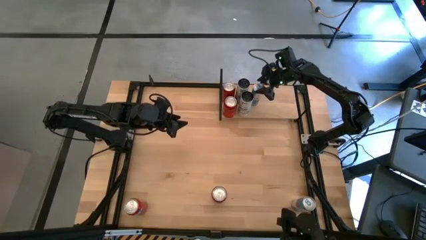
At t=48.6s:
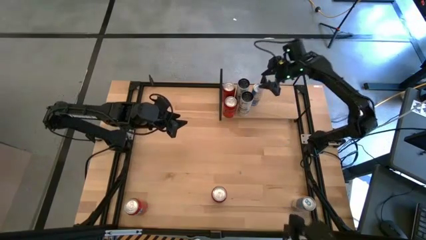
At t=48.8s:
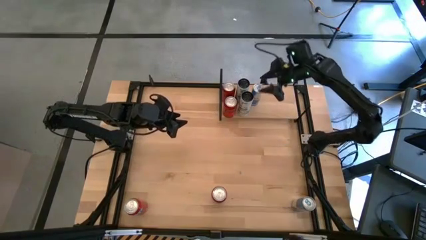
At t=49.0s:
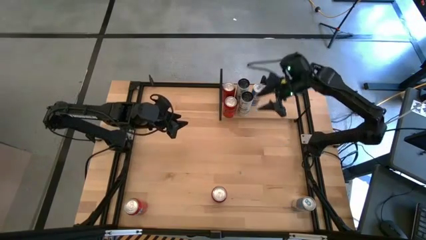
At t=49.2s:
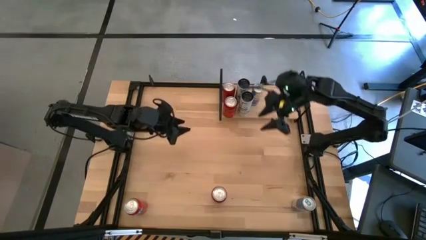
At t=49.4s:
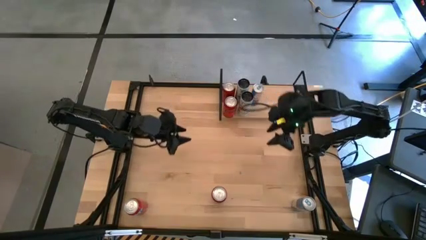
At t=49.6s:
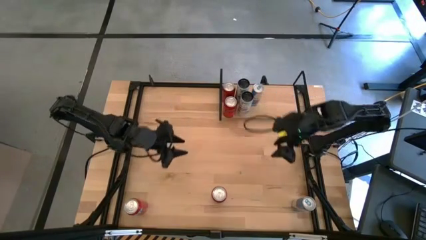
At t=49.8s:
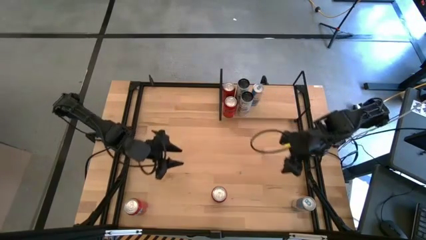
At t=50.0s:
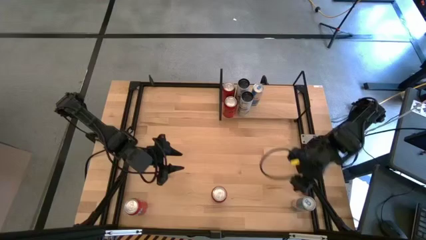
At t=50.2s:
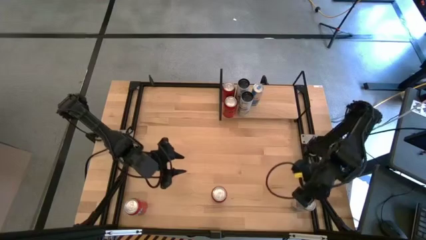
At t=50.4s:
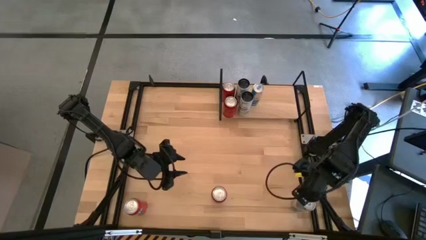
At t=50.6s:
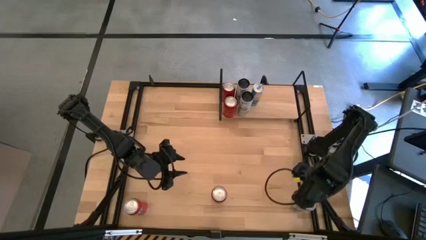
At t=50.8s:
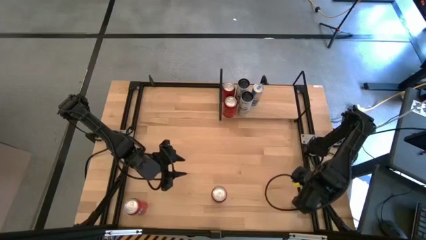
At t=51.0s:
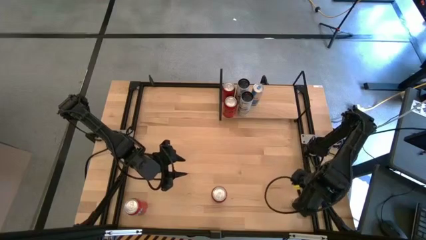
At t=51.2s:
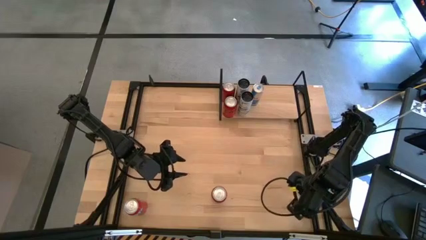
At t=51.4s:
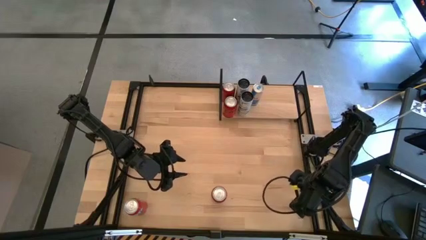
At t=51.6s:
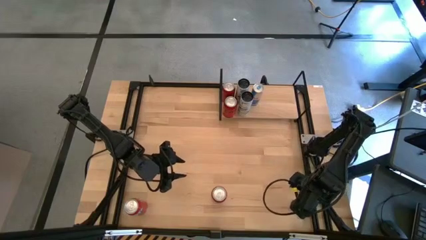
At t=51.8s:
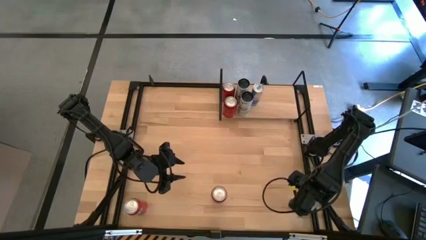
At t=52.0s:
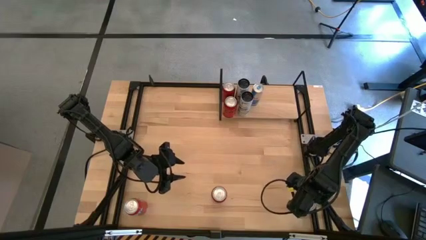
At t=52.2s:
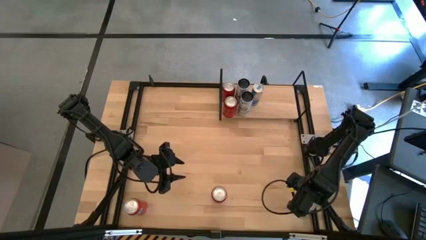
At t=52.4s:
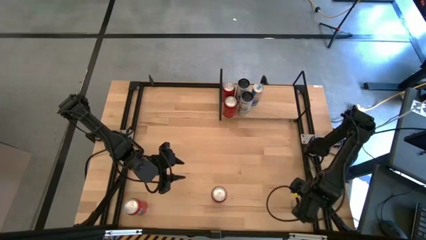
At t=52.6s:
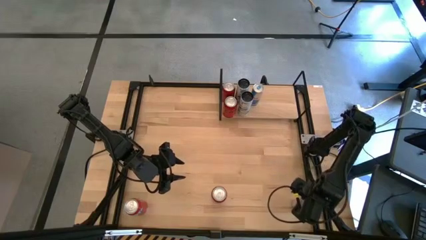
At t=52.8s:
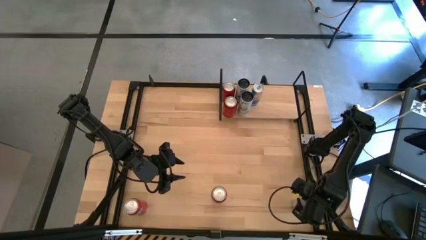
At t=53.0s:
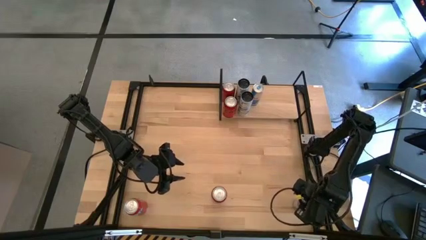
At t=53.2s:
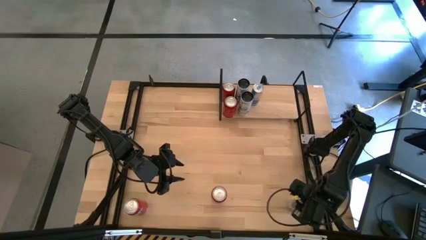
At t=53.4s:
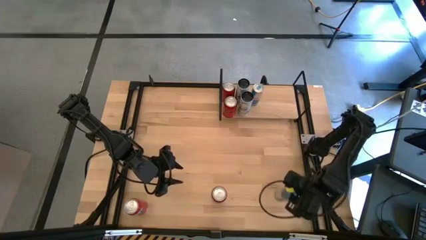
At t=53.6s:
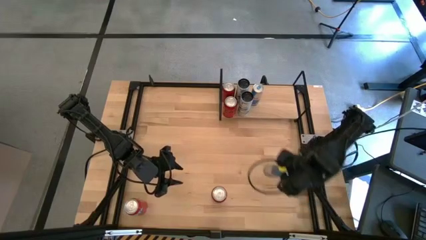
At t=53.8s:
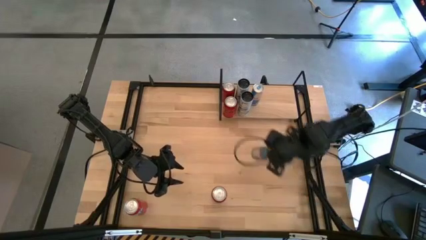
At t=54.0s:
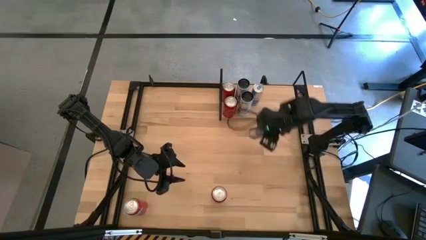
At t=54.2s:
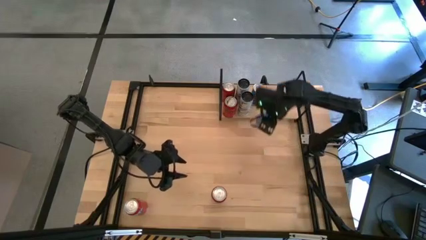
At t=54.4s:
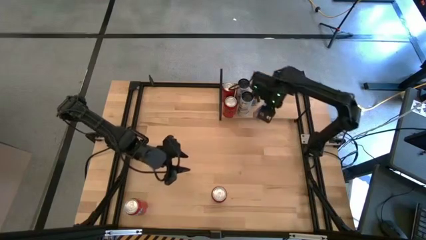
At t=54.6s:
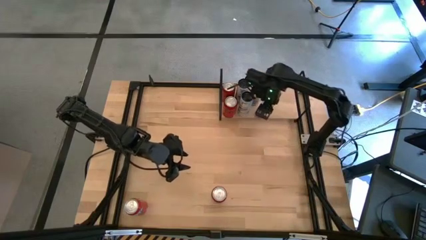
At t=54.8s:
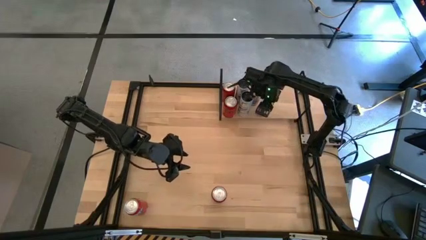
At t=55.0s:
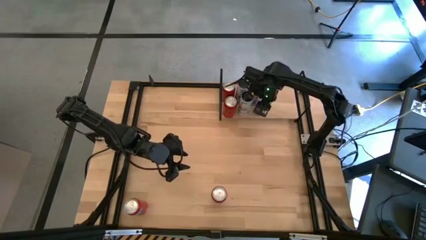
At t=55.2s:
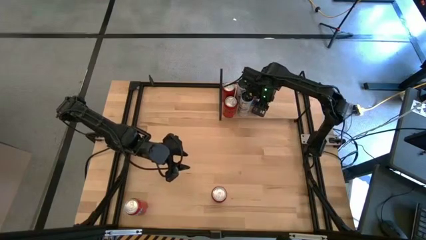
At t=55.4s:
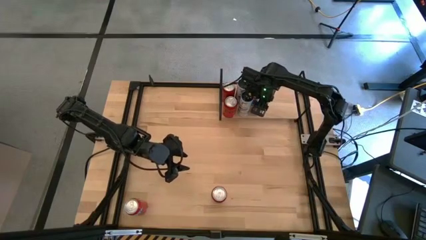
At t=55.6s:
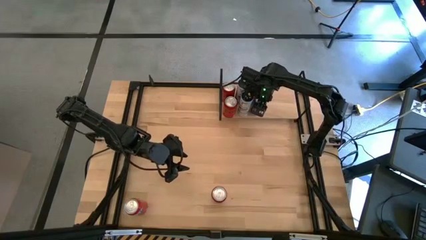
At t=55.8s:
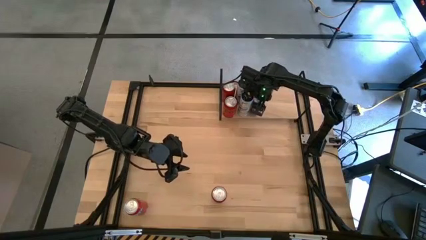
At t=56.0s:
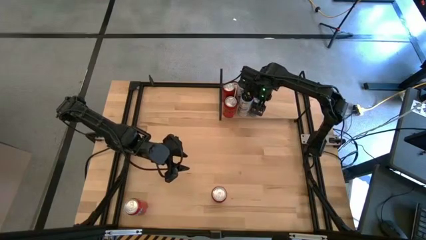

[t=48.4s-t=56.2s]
Task: Place canned beverage on shelf
Put the white-blue soda can on the shelf aligned with other white-blue soda can

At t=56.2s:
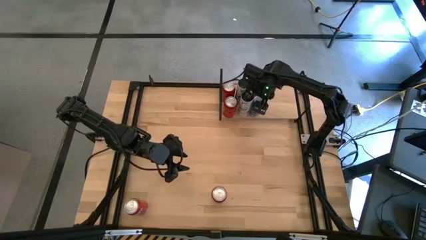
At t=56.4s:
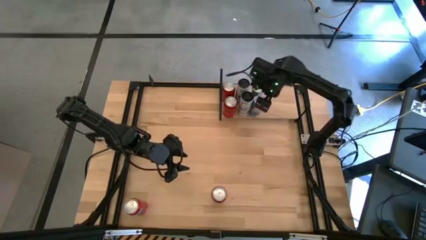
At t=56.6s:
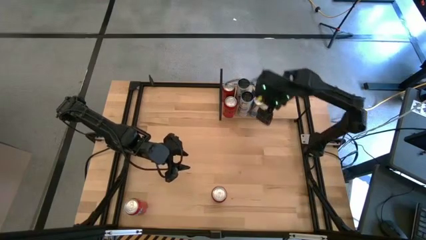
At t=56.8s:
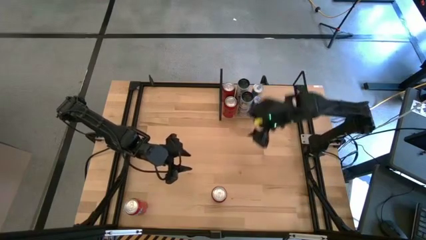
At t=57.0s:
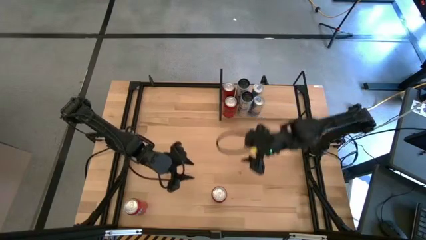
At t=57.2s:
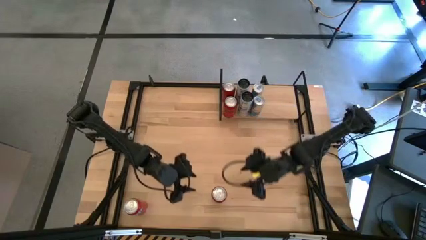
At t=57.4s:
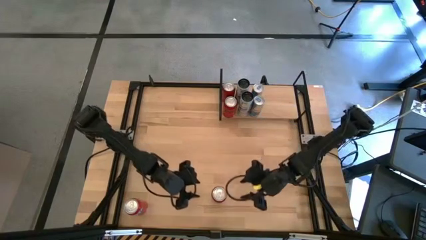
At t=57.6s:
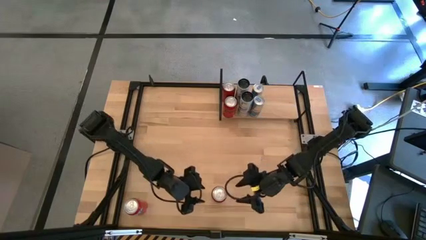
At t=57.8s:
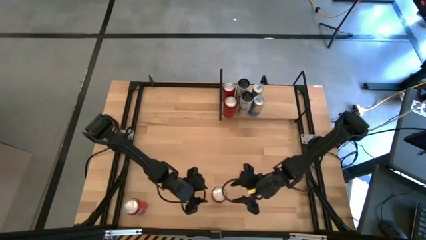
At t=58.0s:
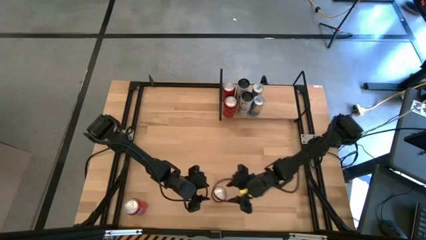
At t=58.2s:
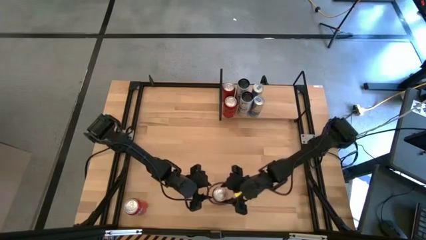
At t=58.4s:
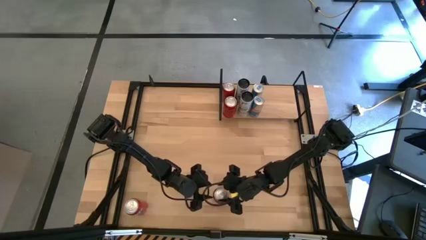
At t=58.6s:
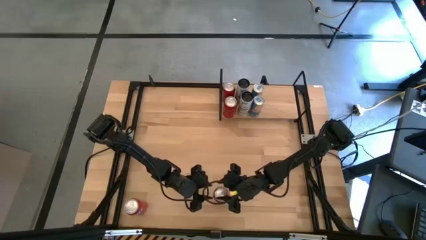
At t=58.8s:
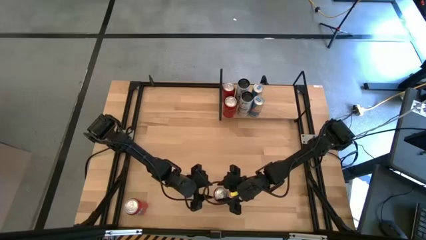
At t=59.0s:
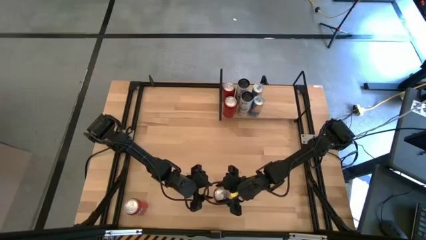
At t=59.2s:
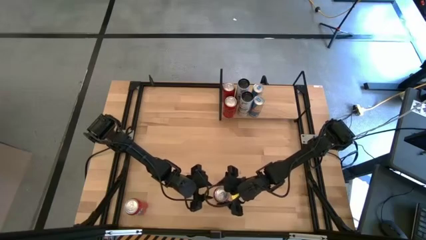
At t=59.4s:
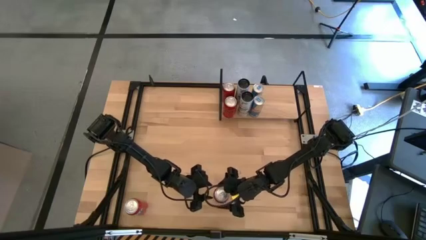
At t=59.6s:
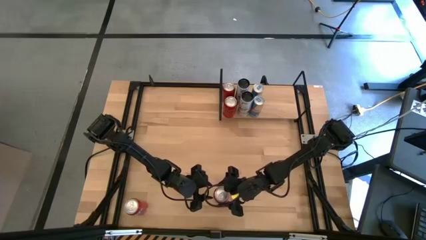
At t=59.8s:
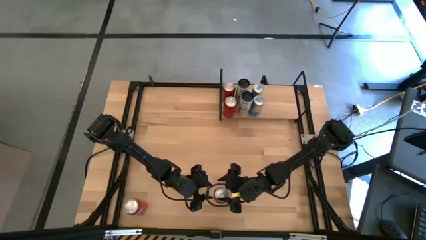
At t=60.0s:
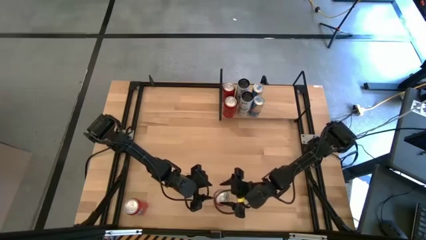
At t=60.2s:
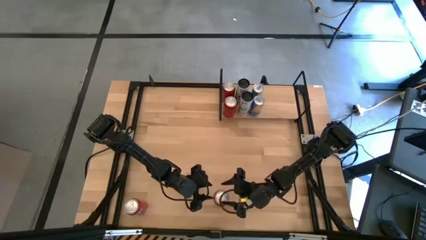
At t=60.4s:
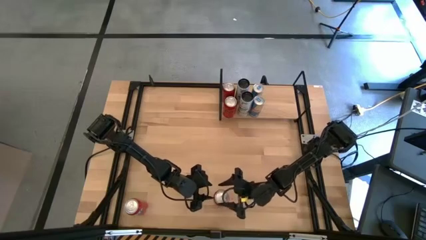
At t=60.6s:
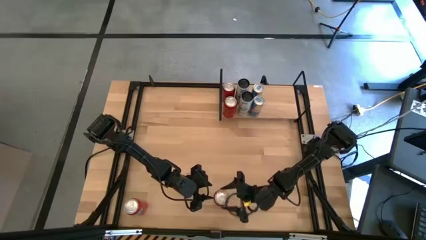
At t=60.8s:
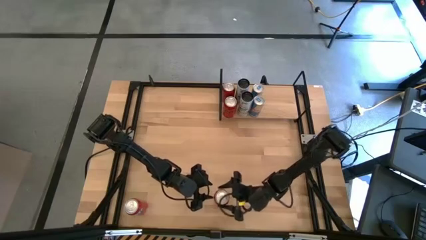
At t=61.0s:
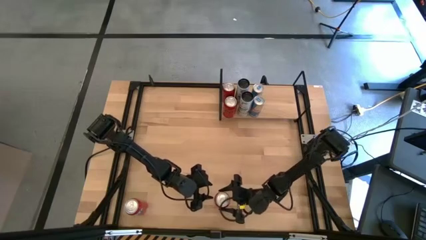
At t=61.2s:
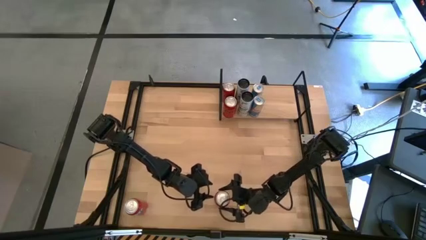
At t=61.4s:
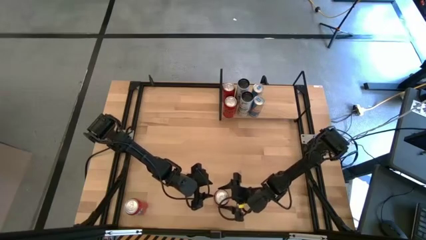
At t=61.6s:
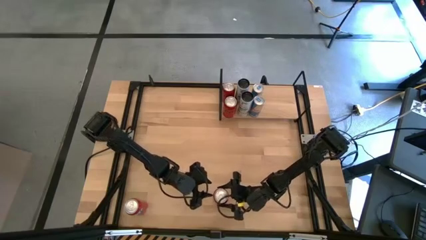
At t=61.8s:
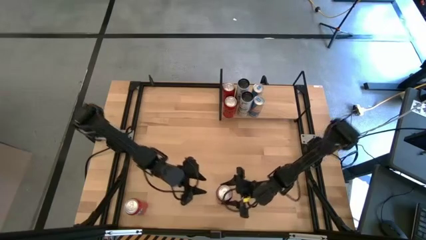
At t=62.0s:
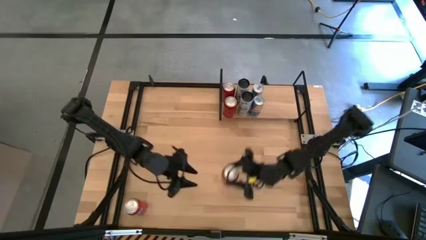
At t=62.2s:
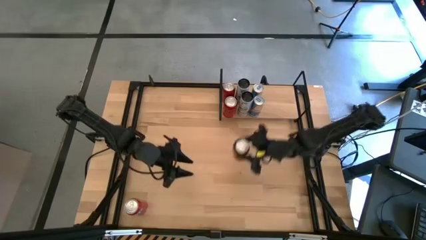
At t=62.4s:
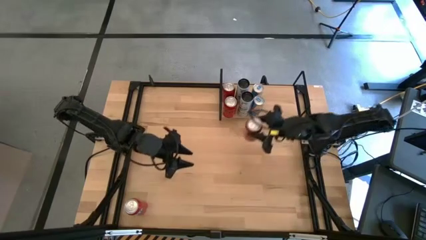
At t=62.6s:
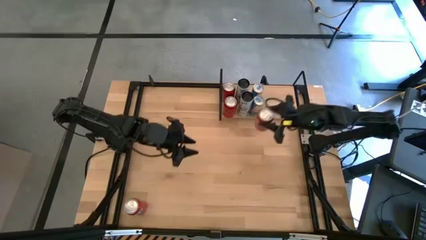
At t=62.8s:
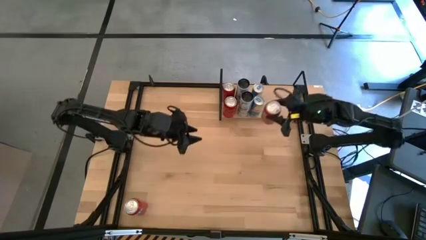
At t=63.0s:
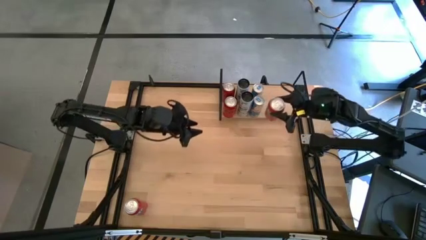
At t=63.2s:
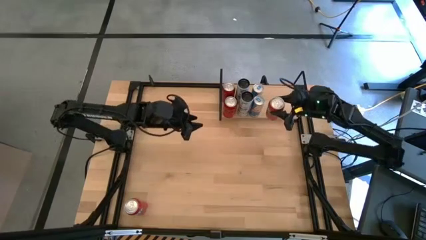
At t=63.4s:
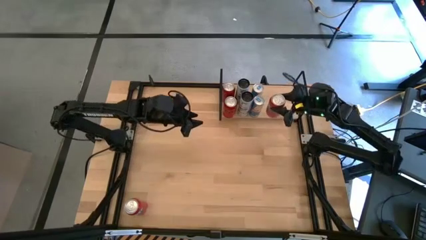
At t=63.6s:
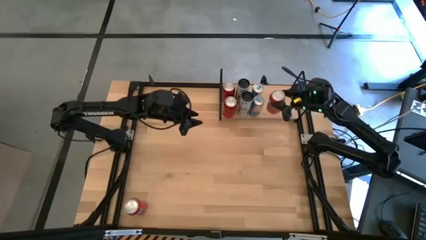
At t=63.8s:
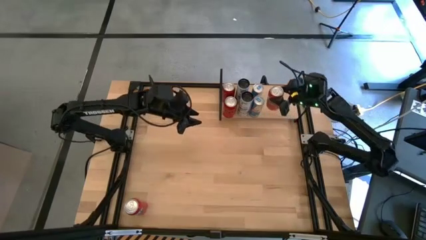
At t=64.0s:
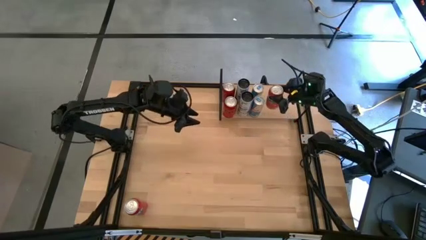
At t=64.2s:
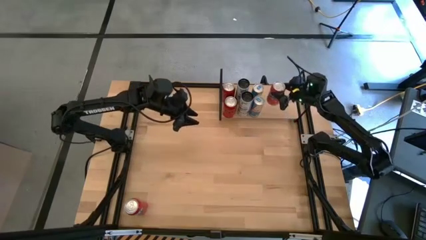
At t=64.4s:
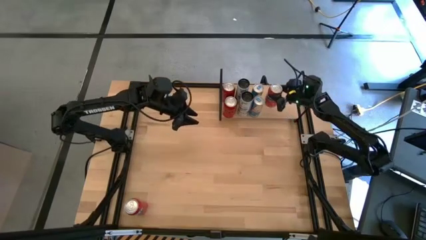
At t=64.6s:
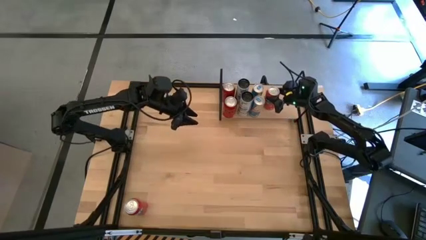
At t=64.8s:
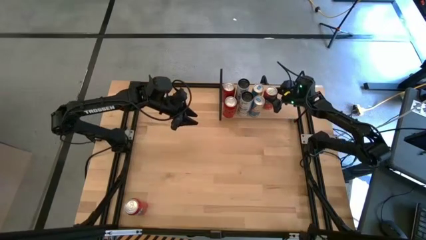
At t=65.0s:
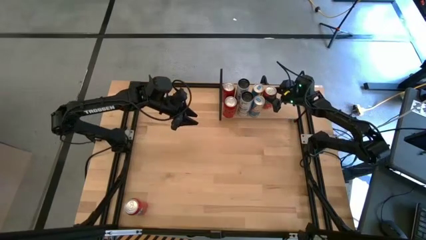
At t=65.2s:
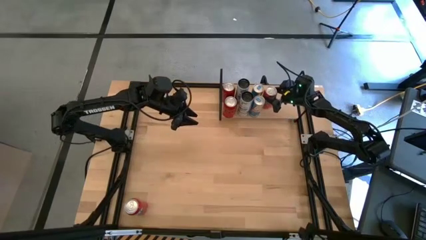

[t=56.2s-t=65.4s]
Put the right orange soda can on the shelf
